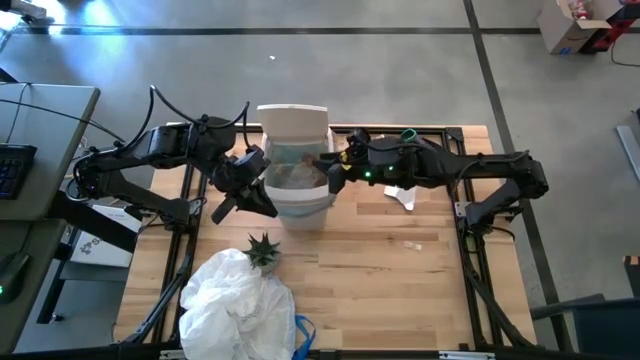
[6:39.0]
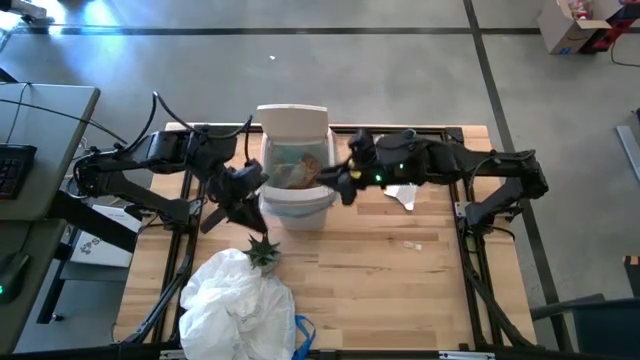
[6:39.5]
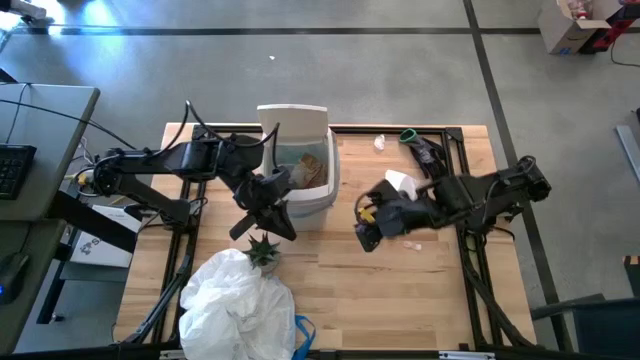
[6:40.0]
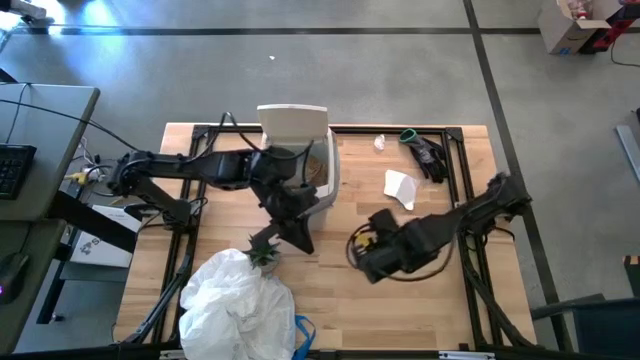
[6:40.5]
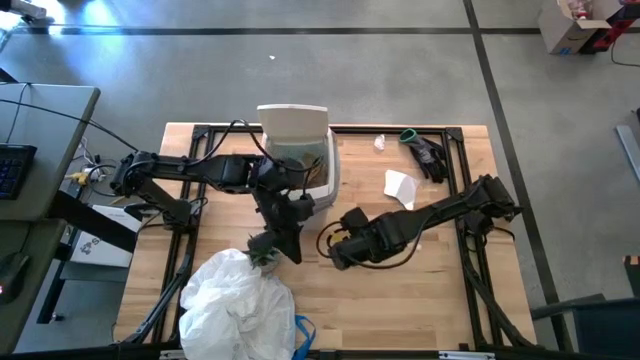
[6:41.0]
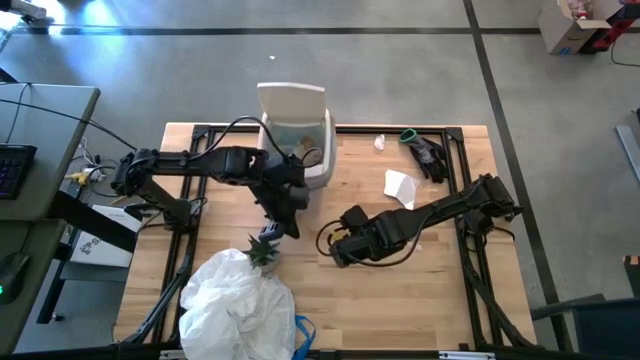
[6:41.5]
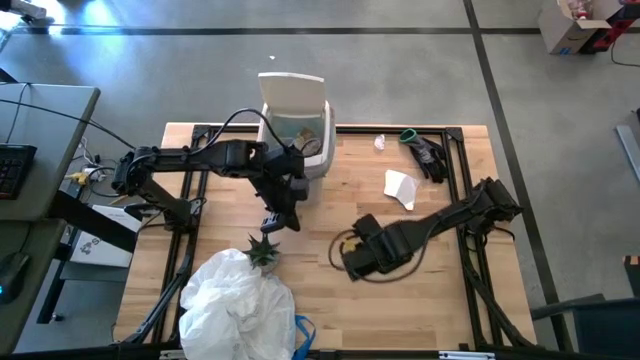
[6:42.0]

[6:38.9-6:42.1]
Task: place trash/remove bag and relplace
Move the trash bin to the top of the table

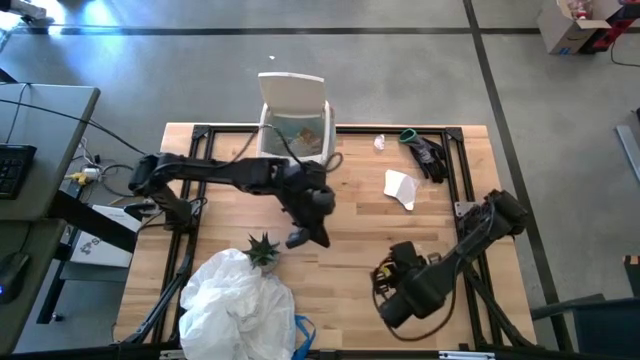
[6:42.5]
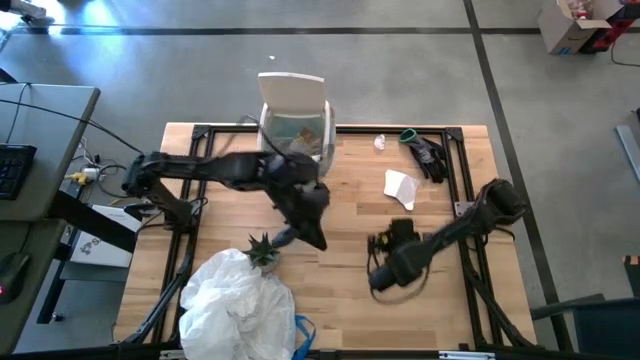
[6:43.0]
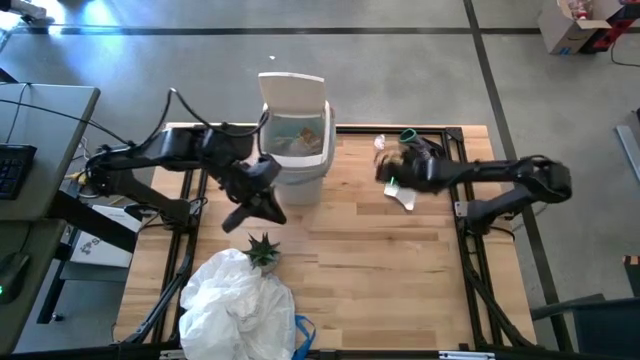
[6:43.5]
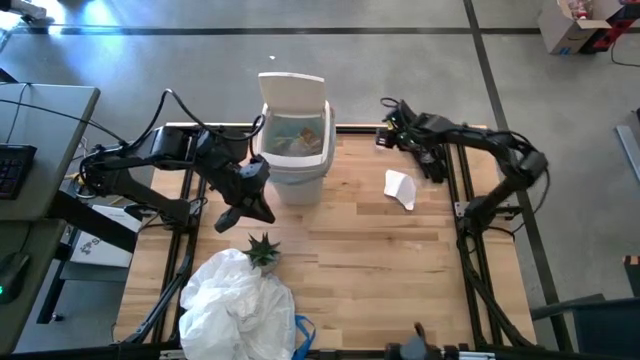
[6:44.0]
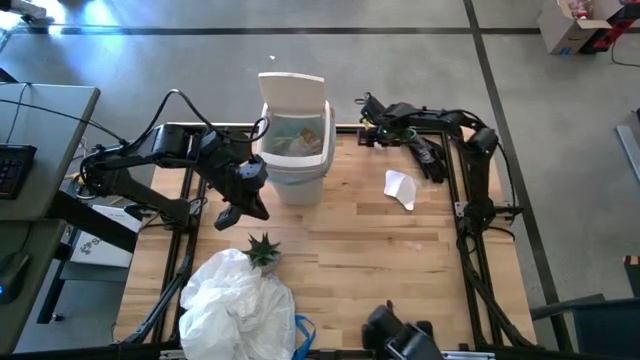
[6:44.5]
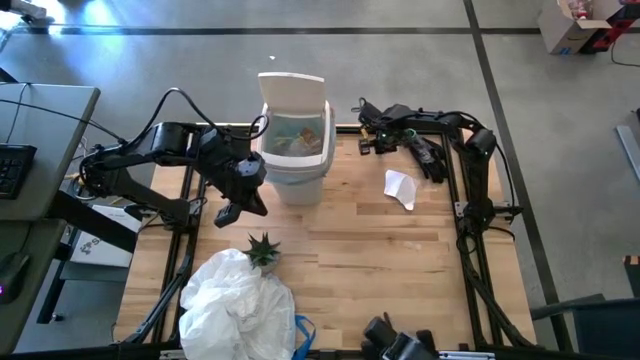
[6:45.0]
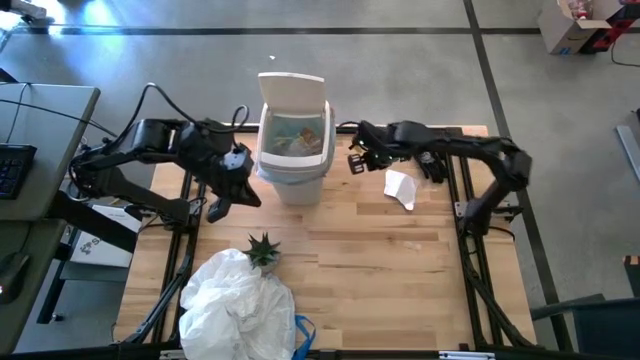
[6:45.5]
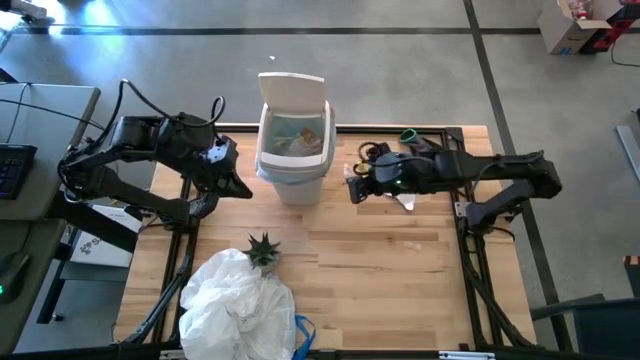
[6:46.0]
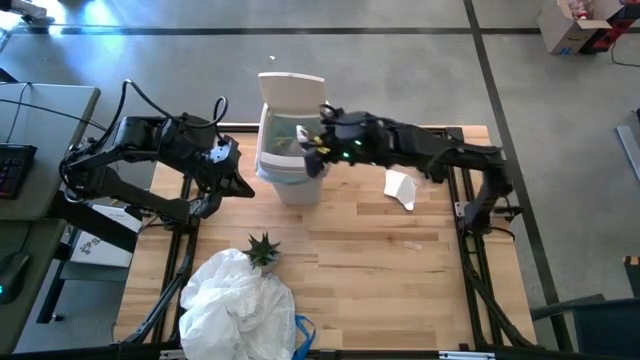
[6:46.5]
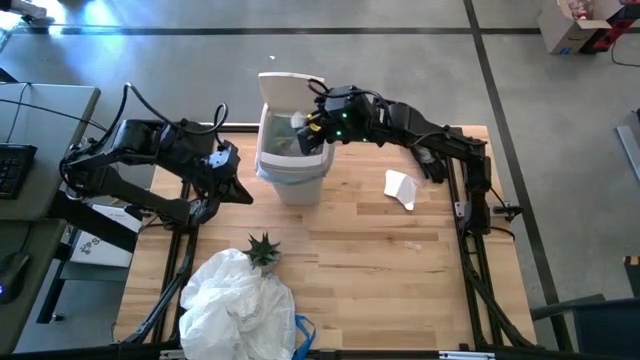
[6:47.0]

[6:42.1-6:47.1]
Put the white plastic into the trash bin

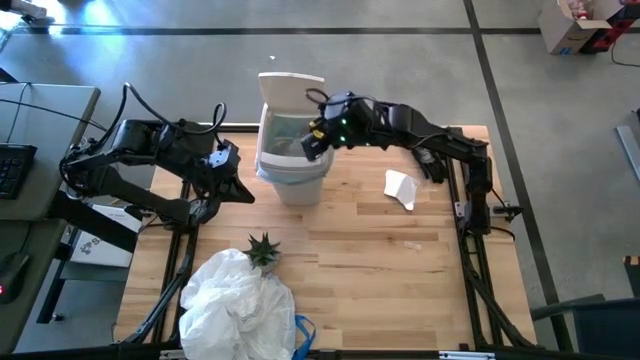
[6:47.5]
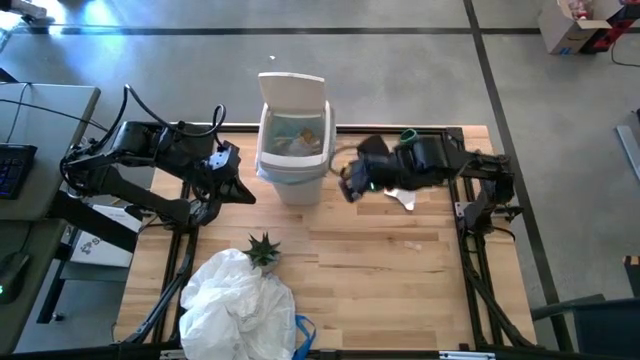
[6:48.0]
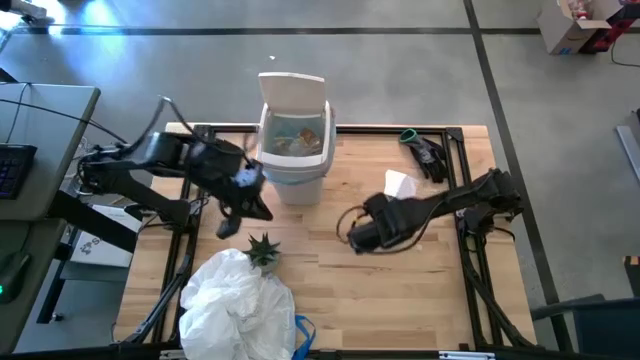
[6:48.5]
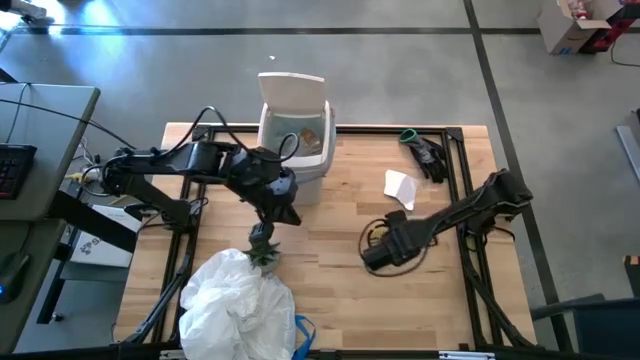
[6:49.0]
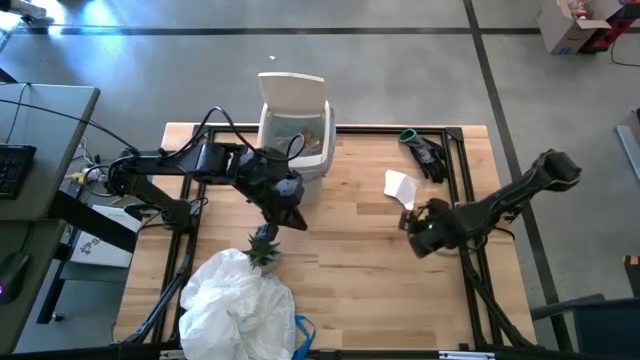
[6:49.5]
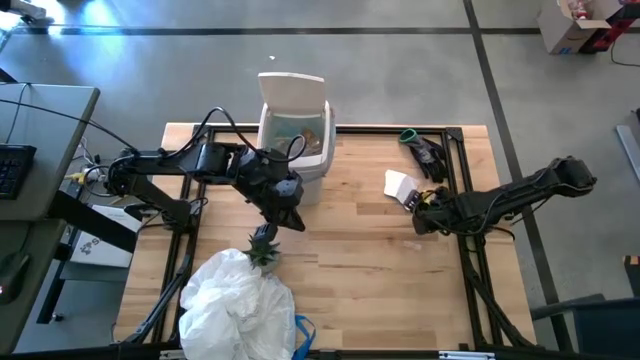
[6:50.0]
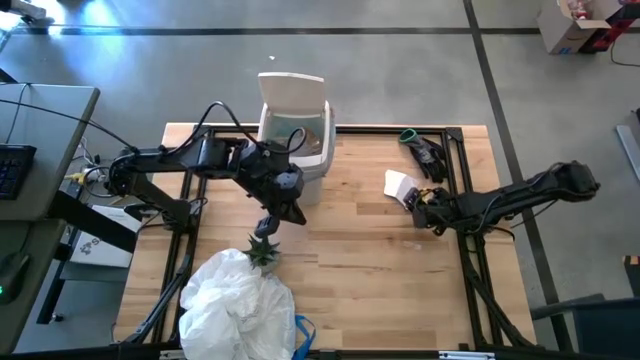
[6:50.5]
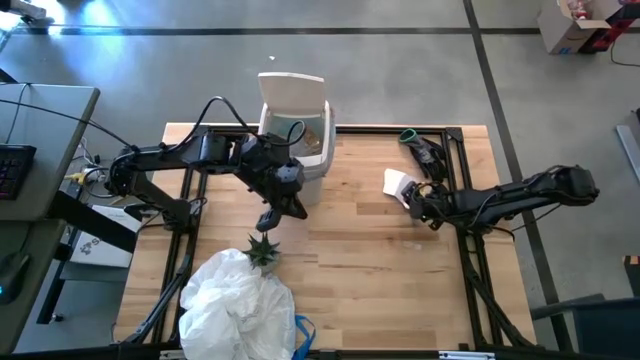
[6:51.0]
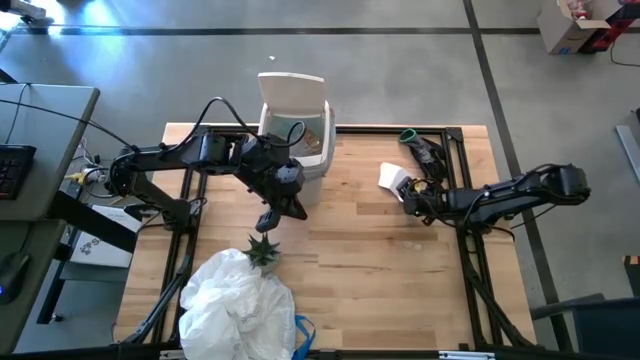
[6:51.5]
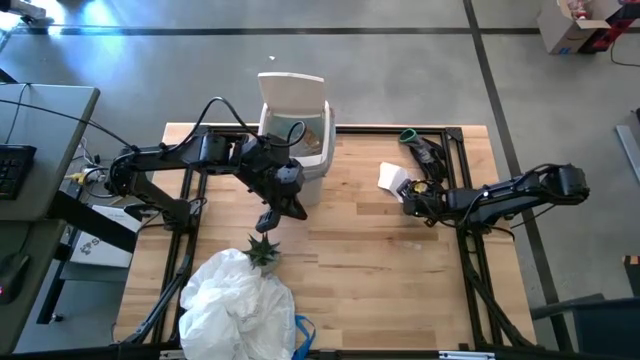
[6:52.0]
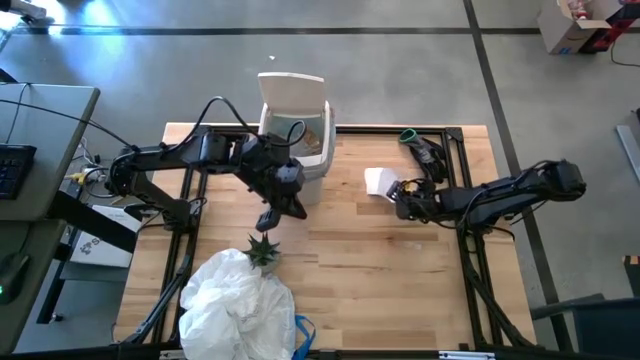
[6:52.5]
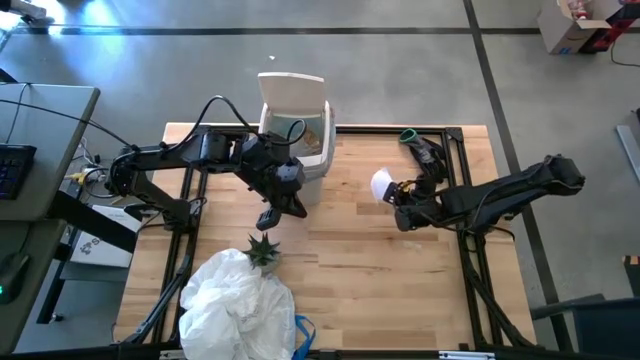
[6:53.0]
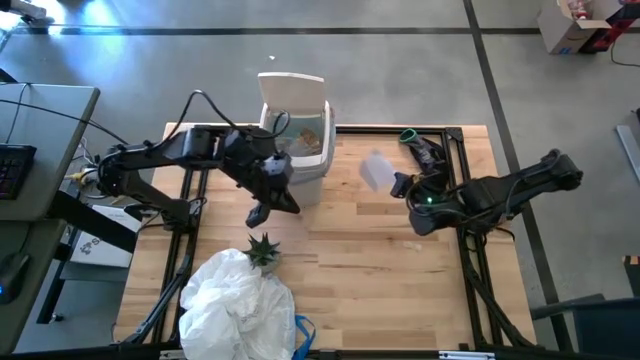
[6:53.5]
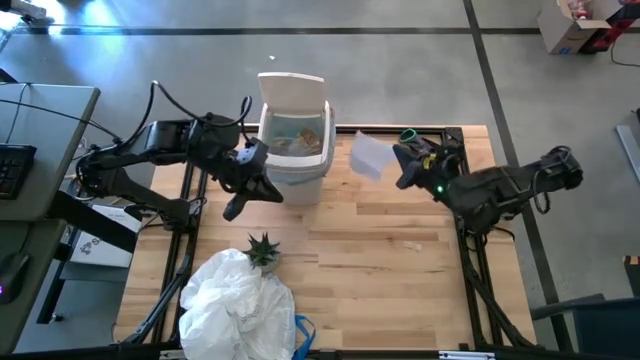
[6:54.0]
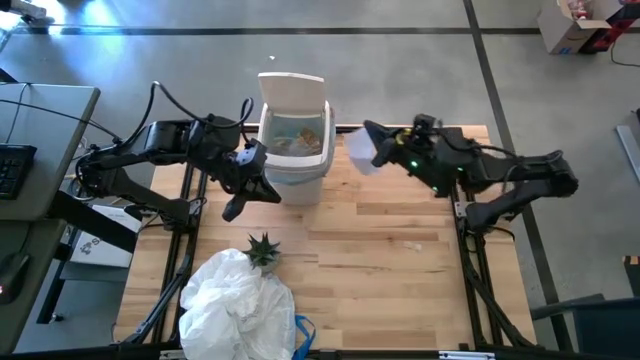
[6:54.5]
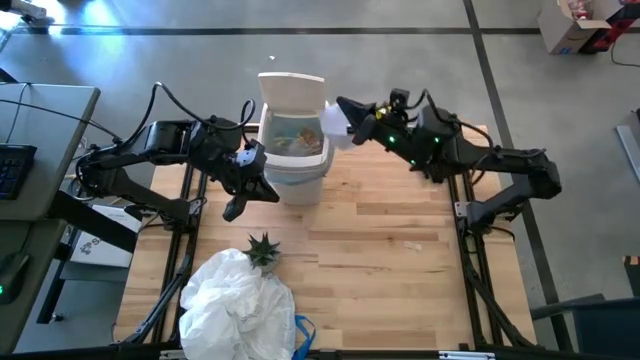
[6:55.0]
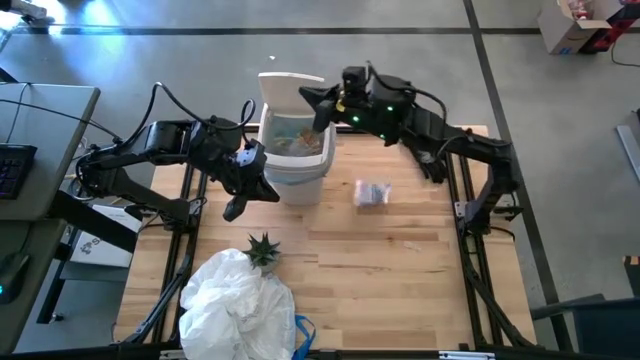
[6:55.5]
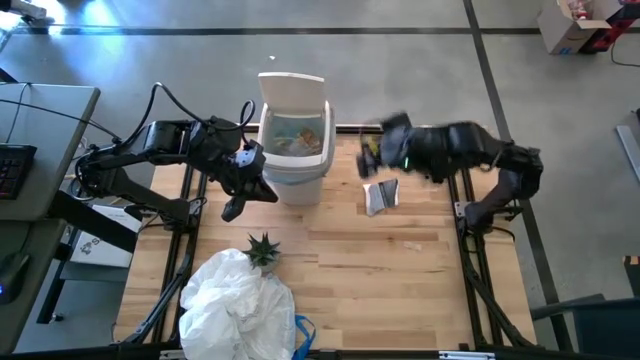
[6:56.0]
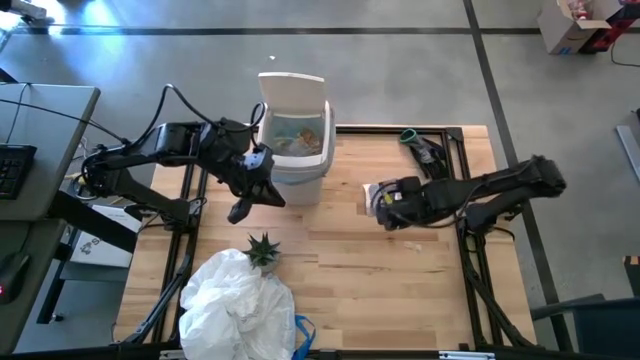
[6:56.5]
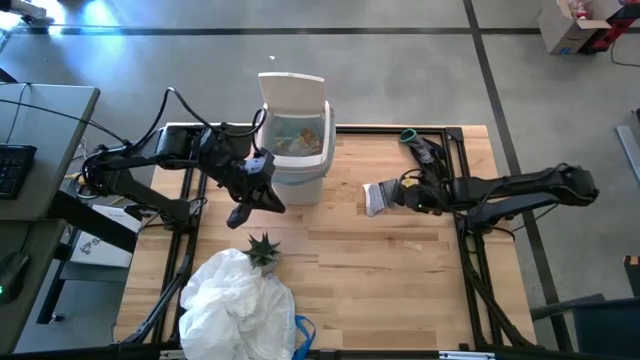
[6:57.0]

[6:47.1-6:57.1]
Put the white paper into the trash bin

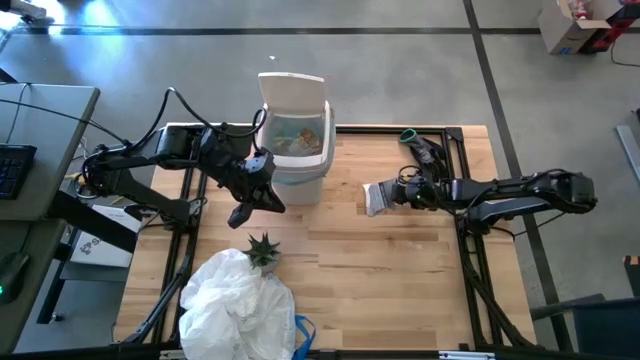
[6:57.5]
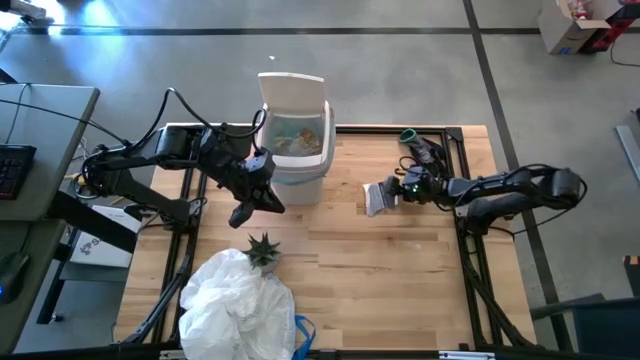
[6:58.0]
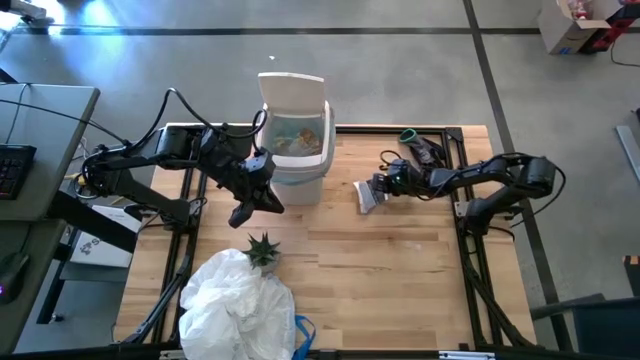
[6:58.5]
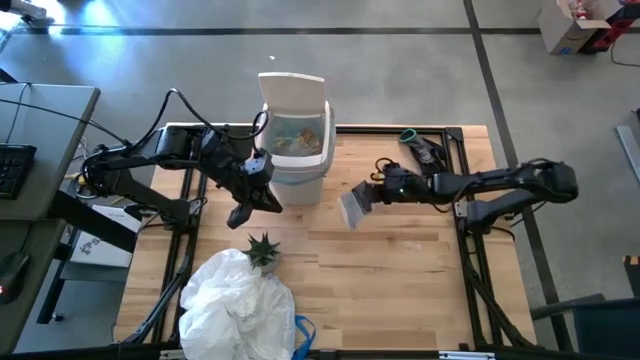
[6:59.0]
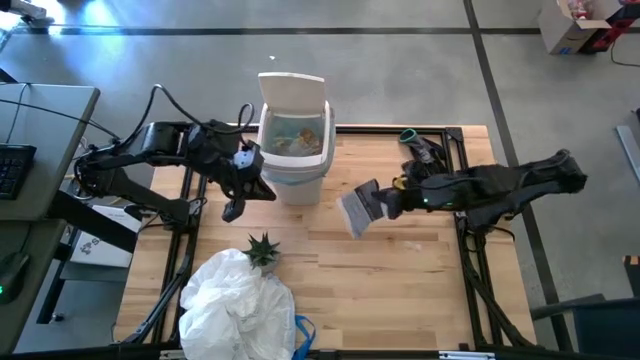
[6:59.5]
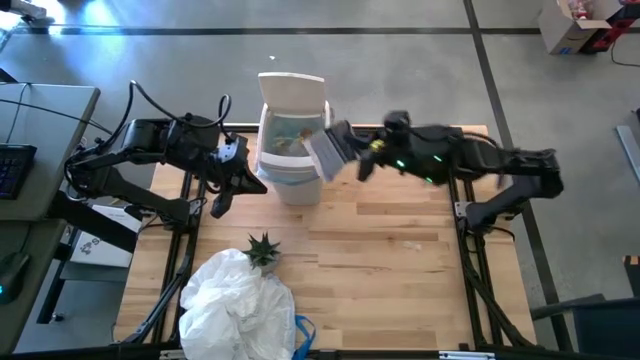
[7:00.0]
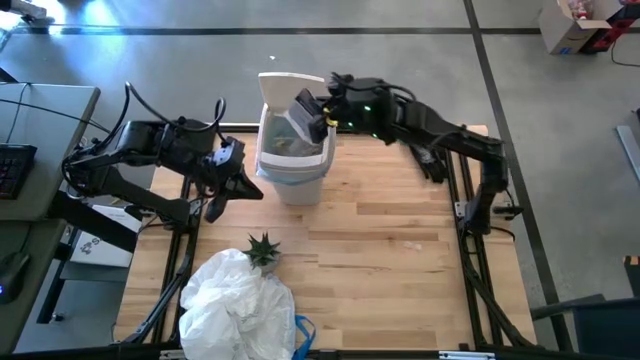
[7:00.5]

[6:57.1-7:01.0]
Put the white paper into the trash bin
